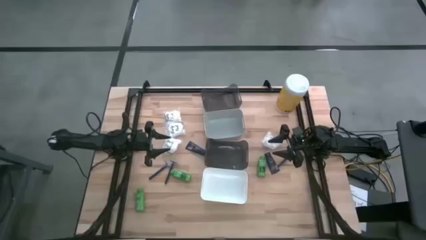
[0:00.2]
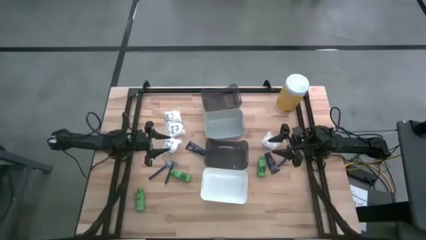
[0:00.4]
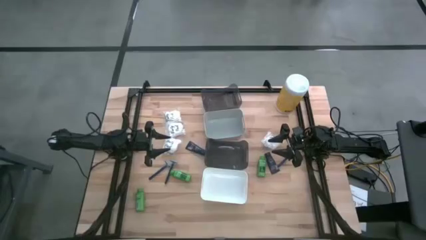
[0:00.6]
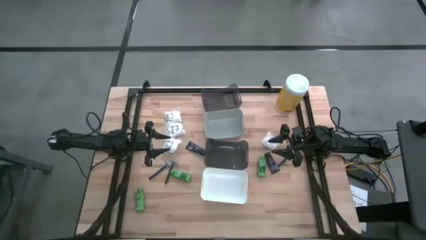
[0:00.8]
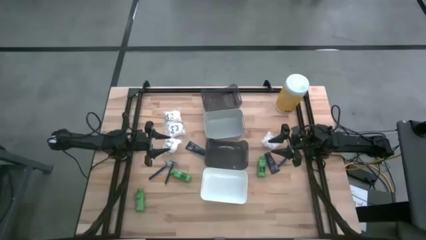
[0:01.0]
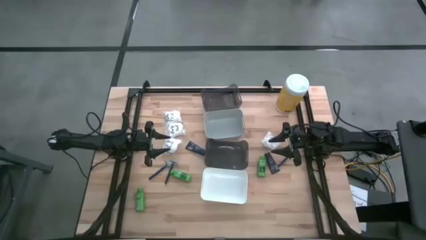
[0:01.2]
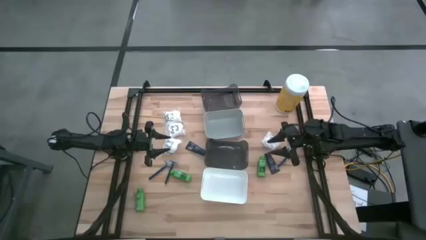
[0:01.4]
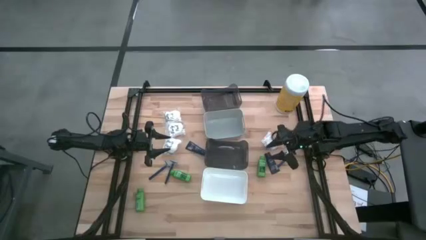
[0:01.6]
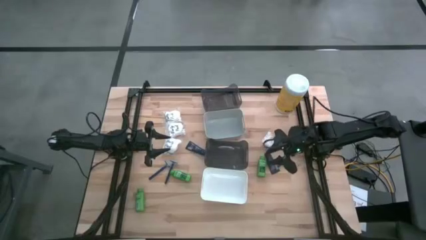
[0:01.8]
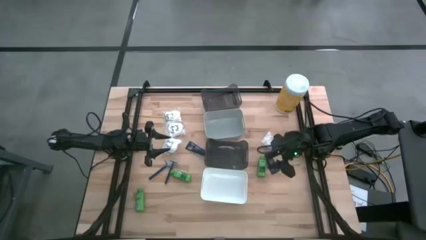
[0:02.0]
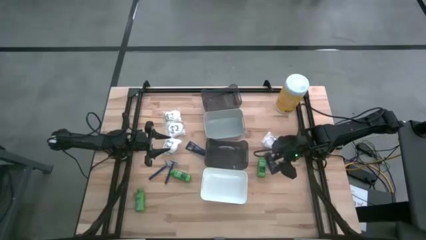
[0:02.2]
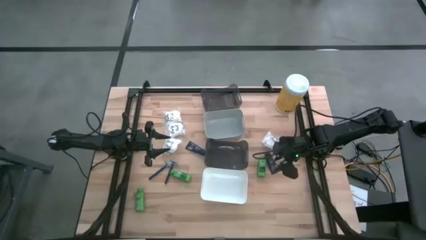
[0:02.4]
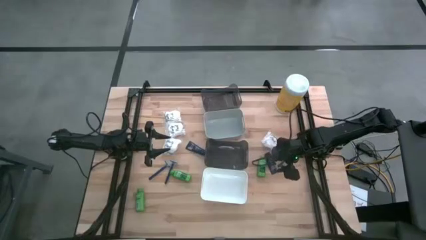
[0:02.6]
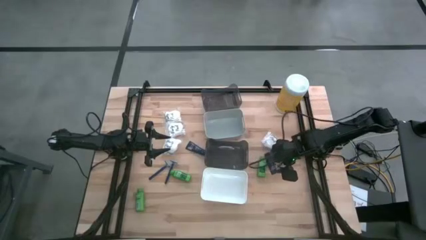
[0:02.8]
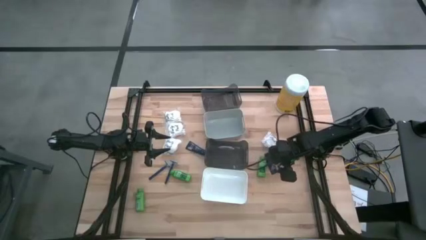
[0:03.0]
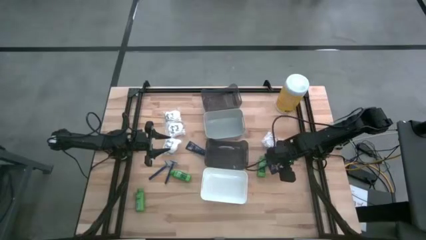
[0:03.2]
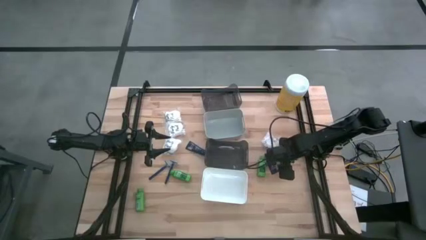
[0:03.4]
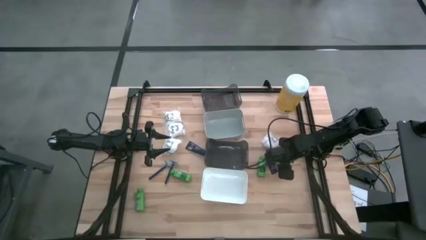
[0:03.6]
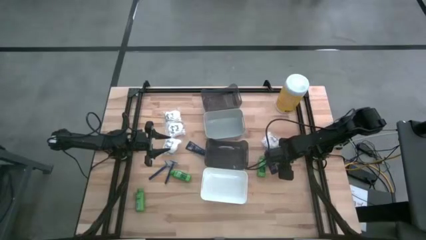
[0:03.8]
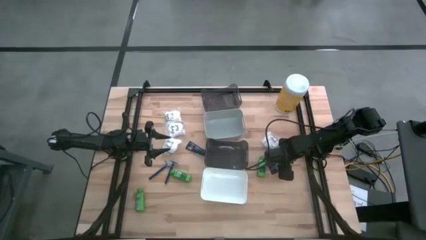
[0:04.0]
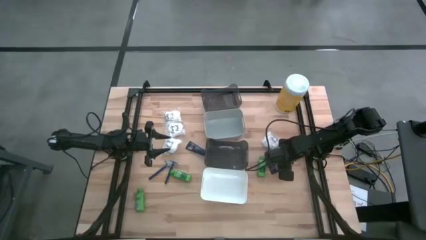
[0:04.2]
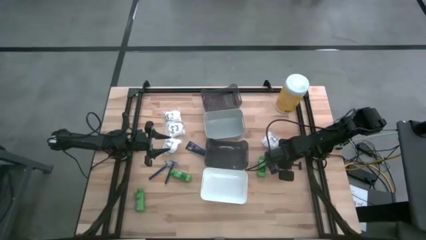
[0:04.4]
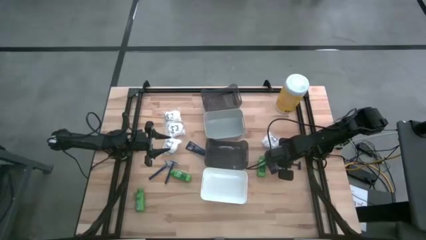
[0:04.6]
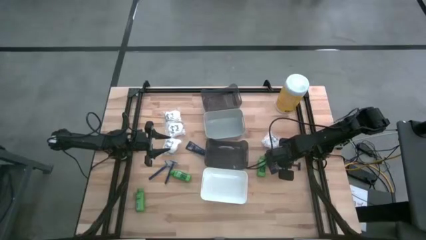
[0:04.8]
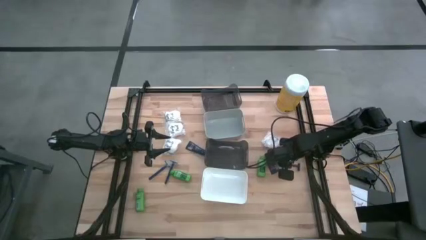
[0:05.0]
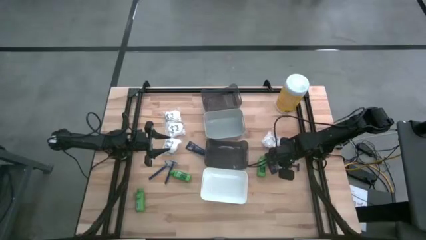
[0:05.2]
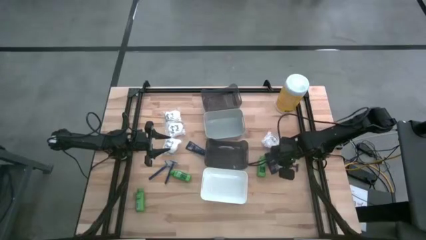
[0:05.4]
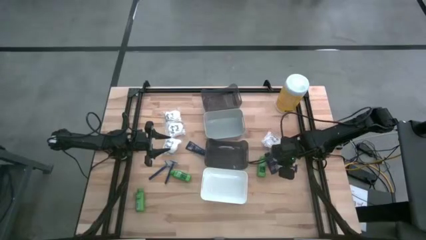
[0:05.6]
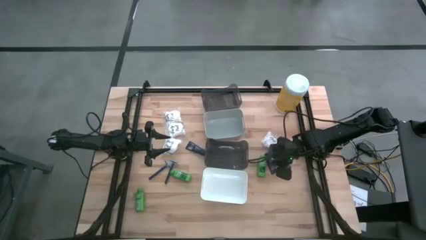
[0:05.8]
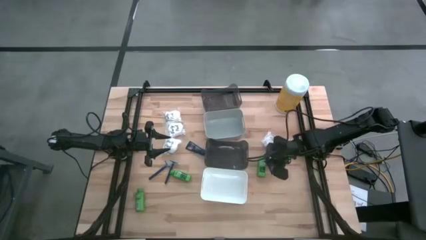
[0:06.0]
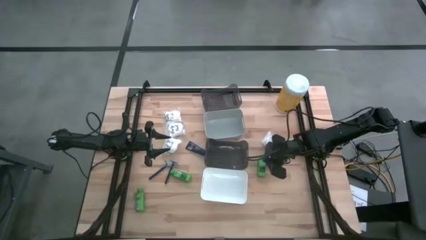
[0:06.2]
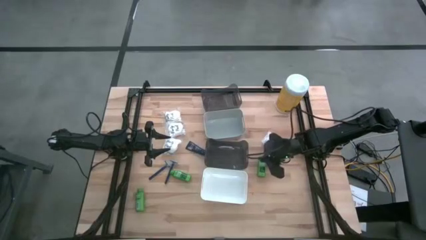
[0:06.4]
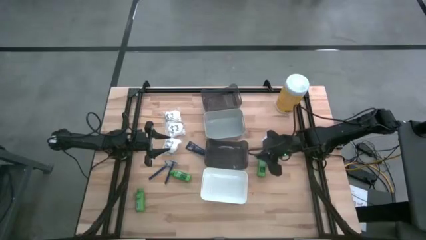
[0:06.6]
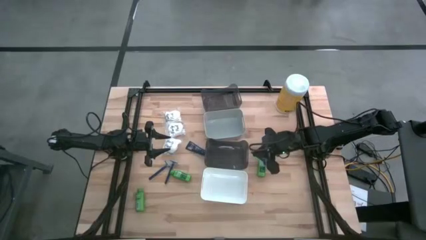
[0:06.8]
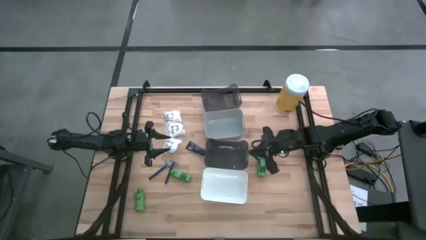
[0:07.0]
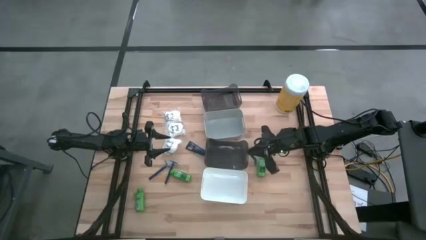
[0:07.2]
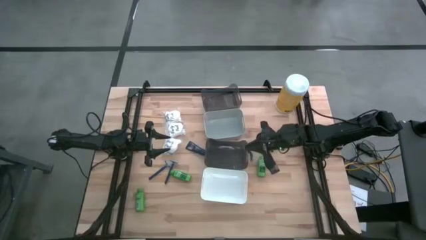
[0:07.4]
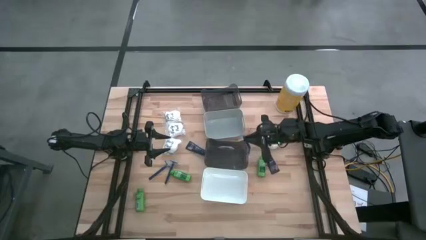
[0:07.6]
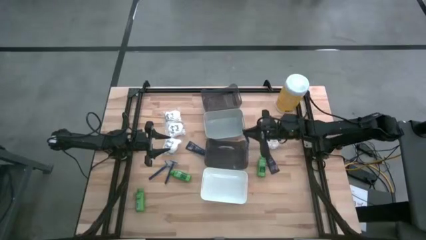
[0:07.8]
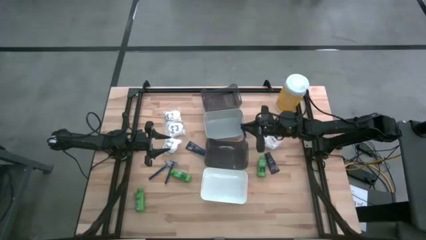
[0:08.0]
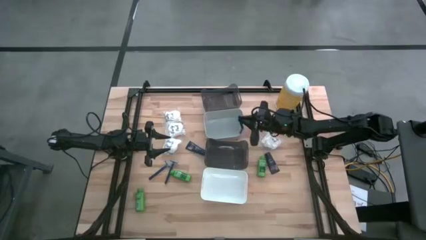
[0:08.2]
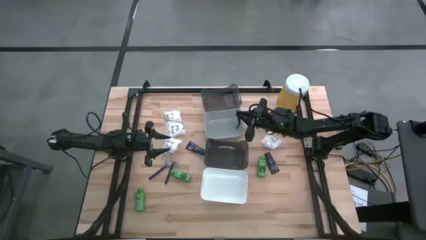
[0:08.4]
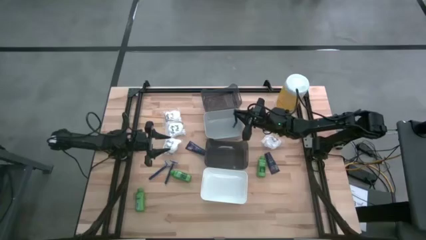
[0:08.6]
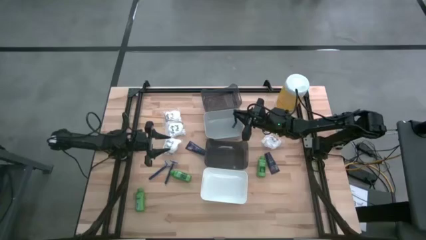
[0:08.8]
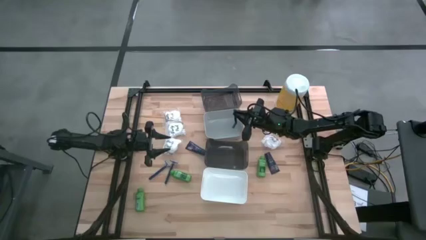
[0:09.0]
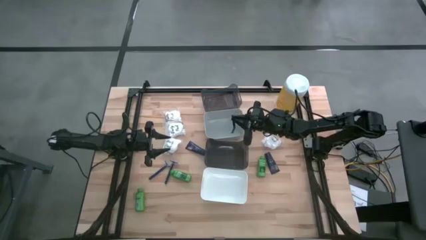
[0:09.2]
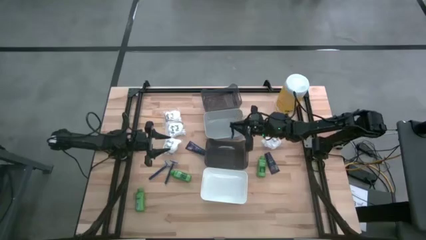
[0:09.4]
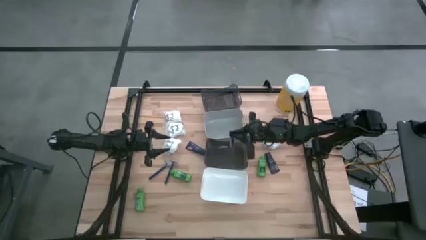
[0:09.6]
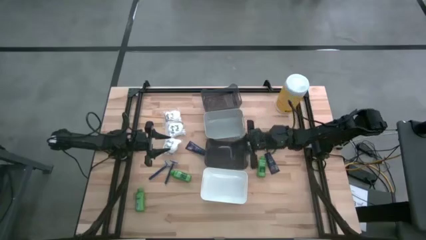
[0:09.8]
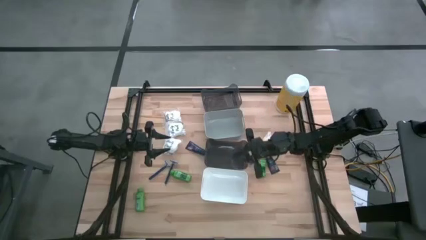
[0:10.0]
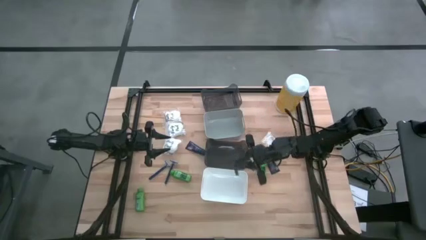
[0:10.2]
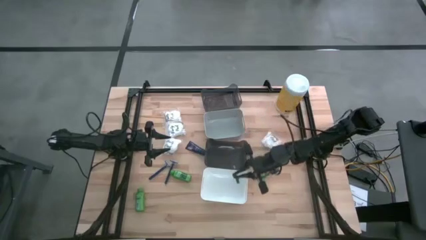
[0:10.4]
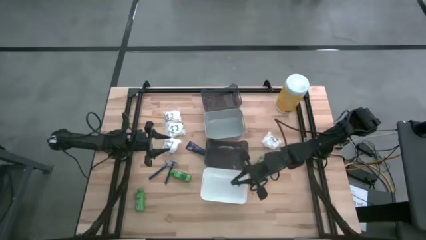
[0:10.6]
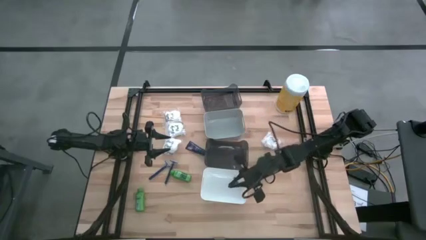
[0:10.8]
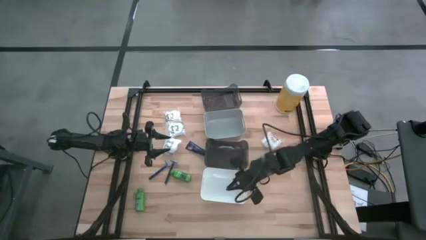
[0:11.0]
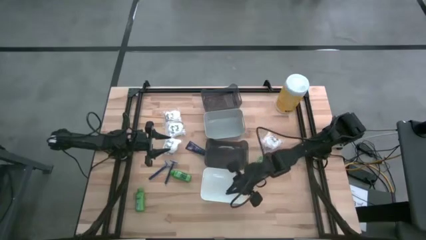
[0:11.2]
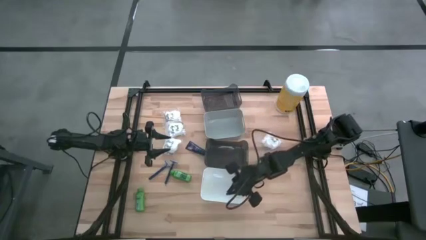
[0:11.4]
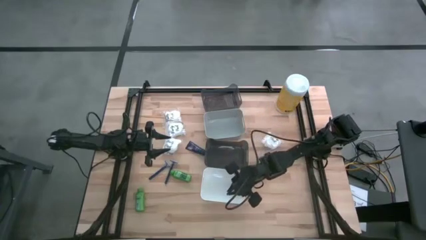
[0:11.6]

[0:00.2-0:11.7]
Task: Pick & Place Travel size toiletries
Put the right blue razor into the white bin
